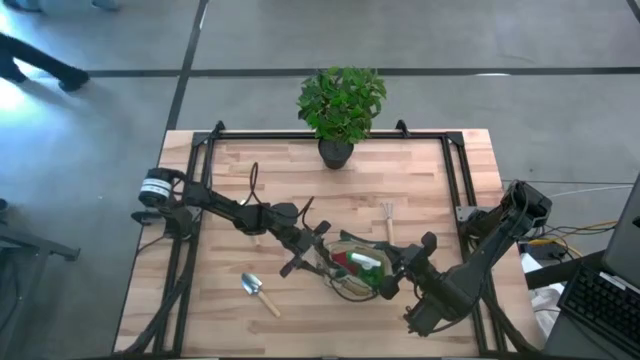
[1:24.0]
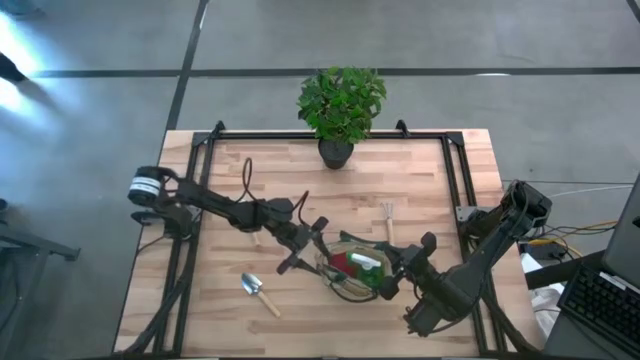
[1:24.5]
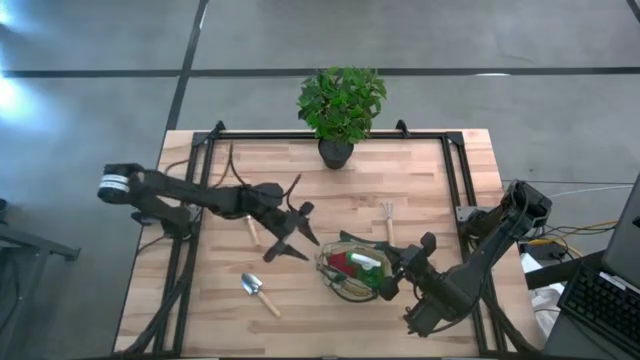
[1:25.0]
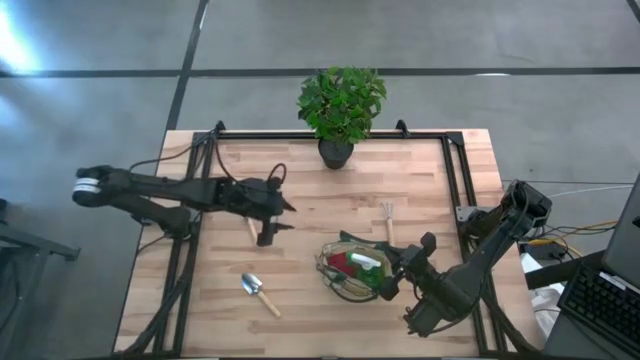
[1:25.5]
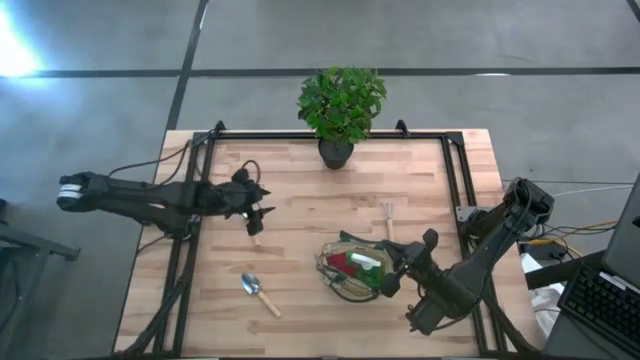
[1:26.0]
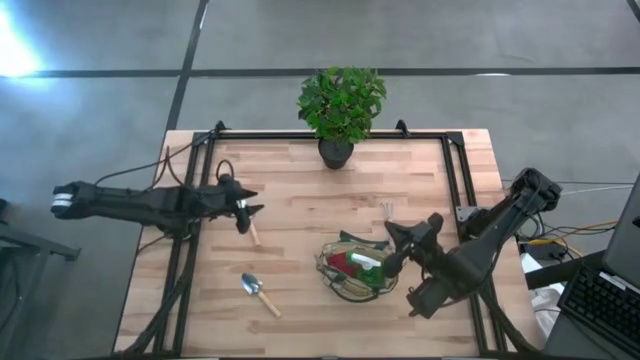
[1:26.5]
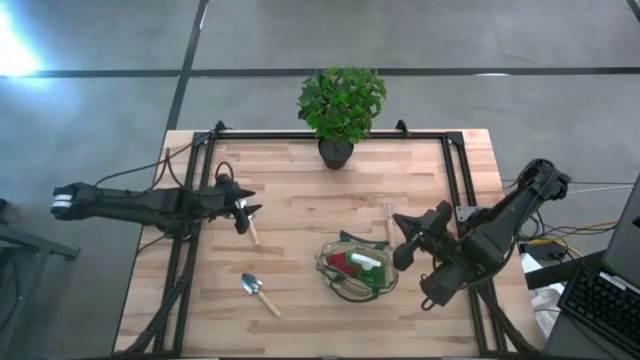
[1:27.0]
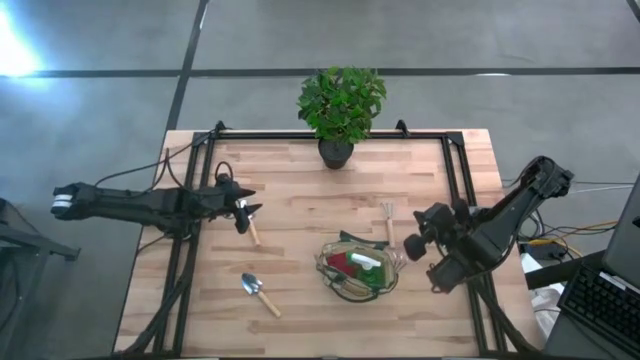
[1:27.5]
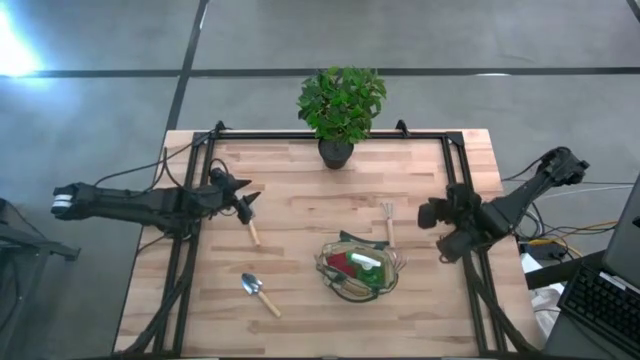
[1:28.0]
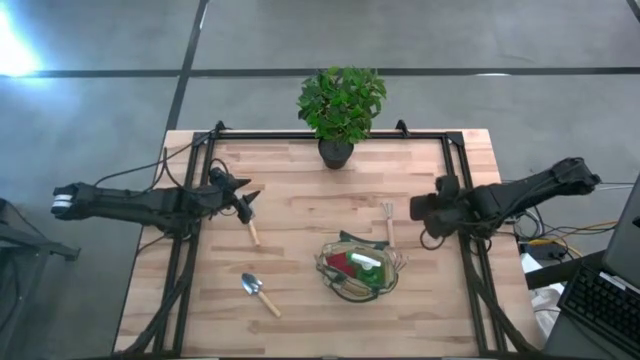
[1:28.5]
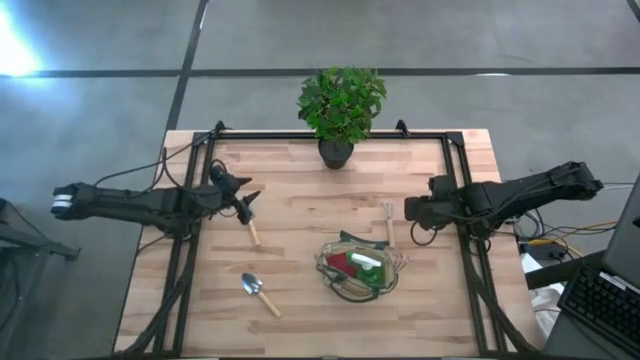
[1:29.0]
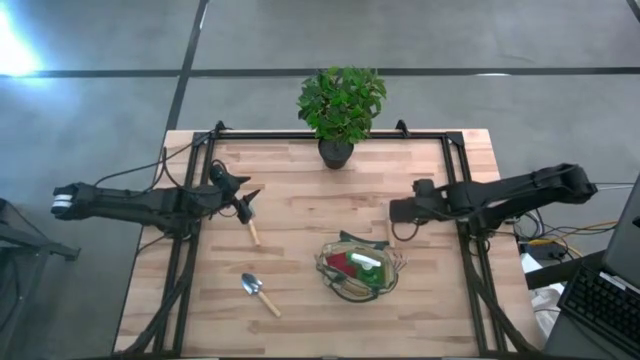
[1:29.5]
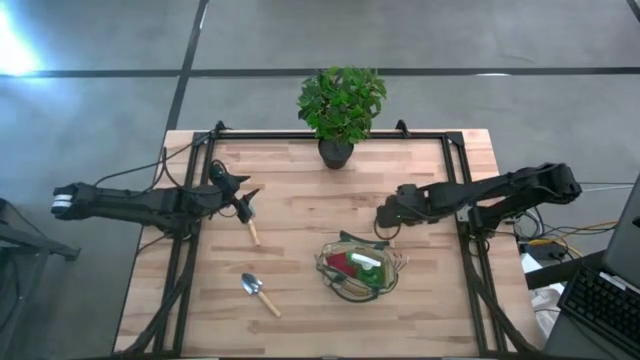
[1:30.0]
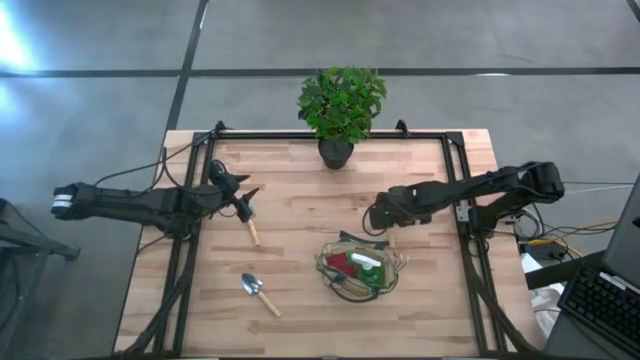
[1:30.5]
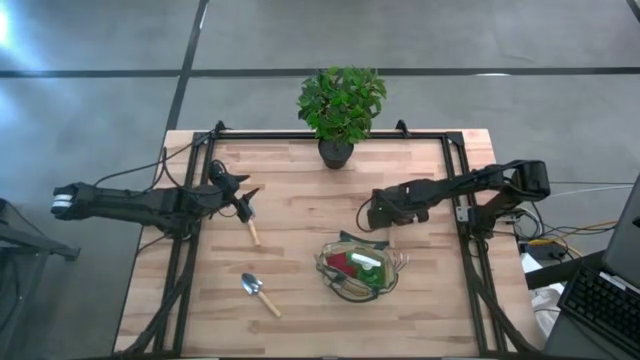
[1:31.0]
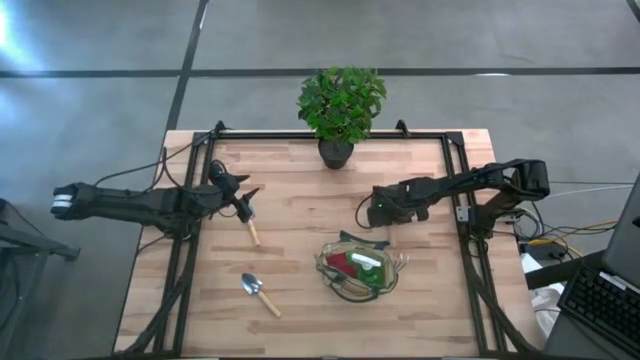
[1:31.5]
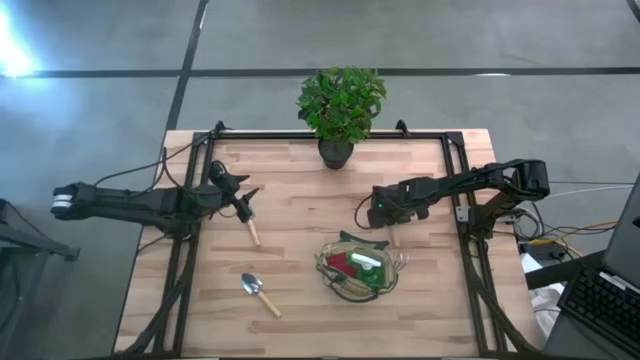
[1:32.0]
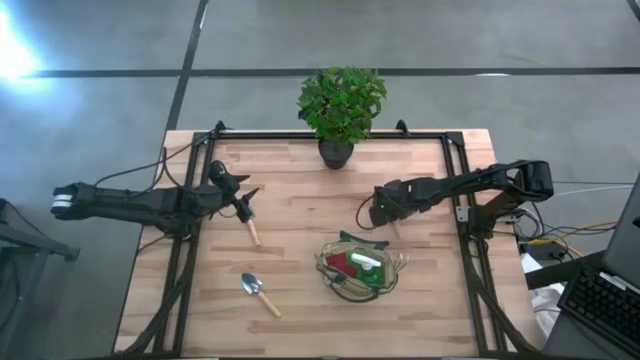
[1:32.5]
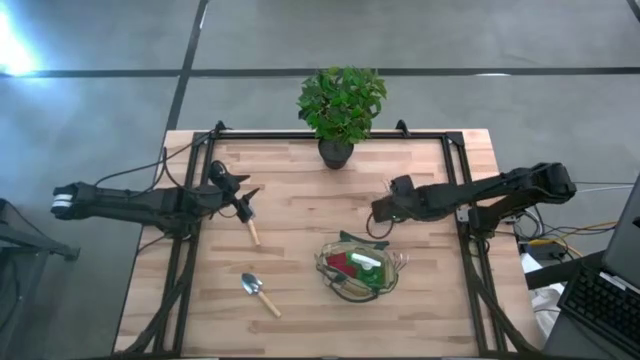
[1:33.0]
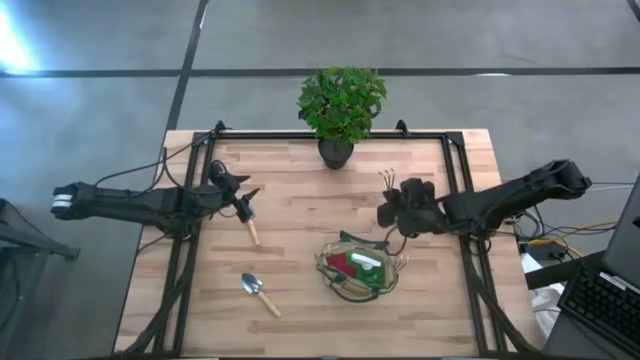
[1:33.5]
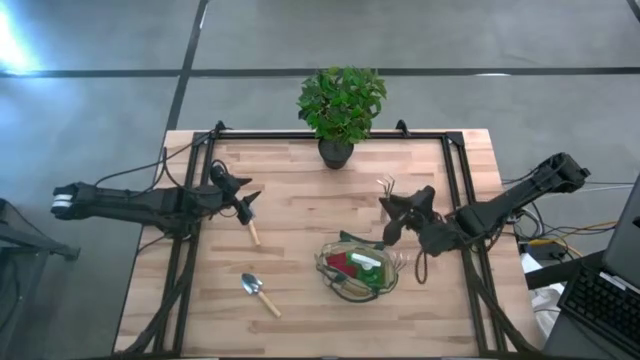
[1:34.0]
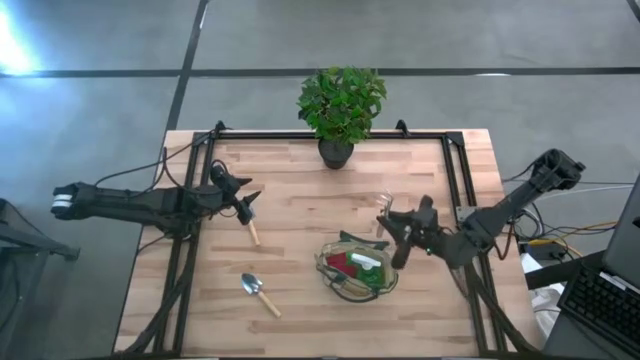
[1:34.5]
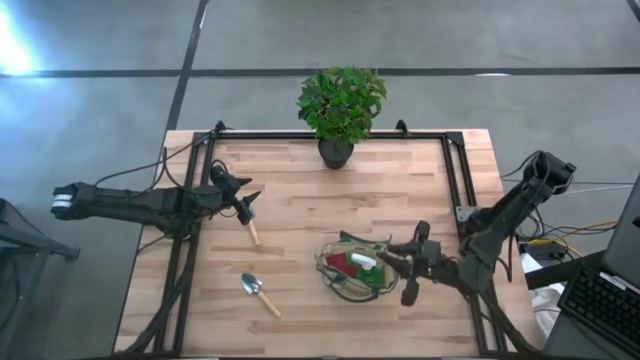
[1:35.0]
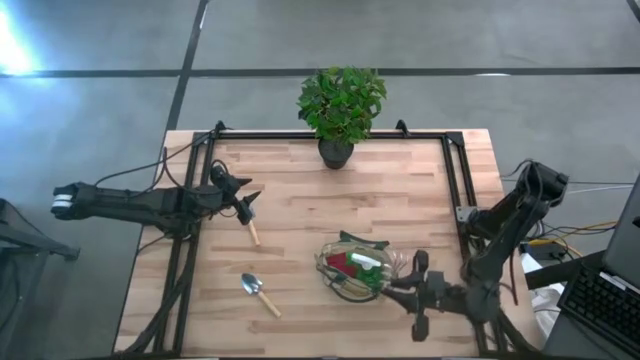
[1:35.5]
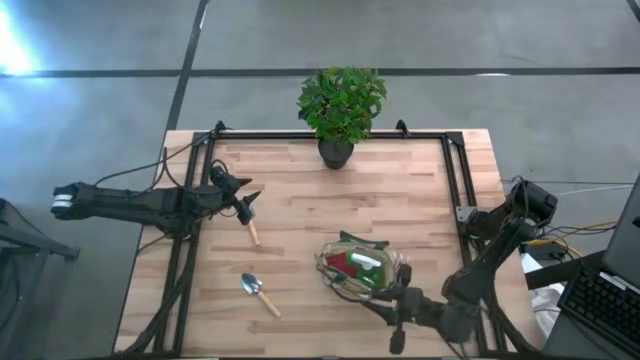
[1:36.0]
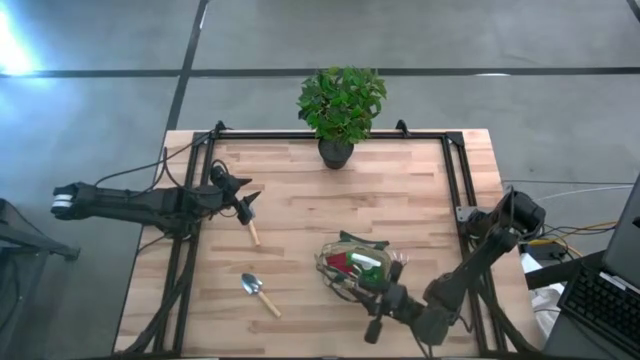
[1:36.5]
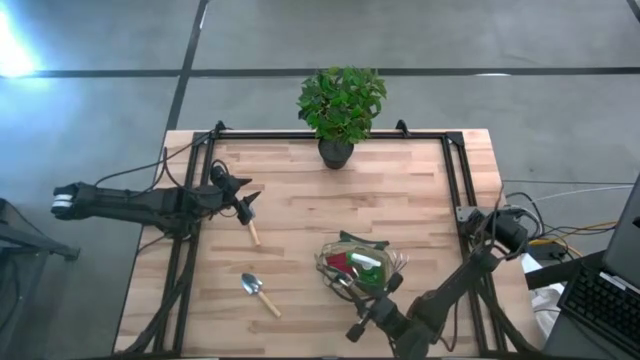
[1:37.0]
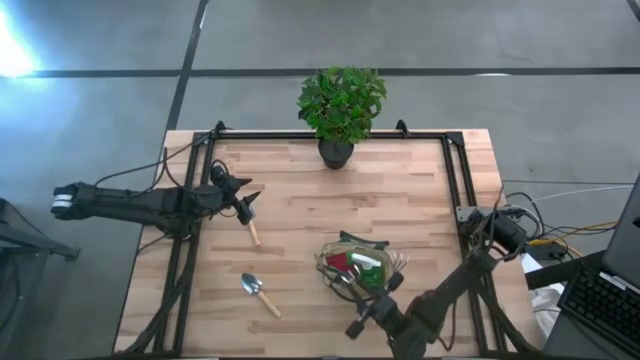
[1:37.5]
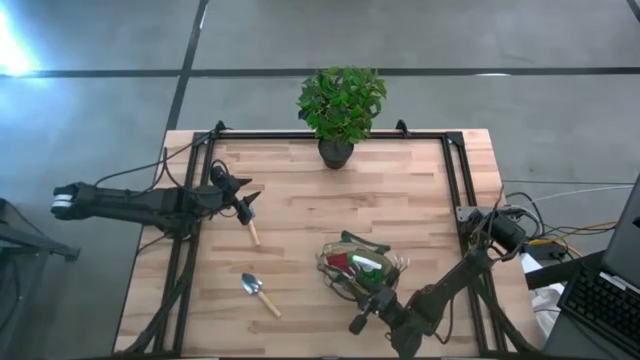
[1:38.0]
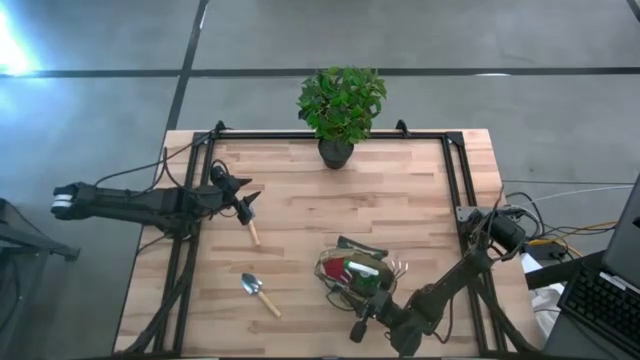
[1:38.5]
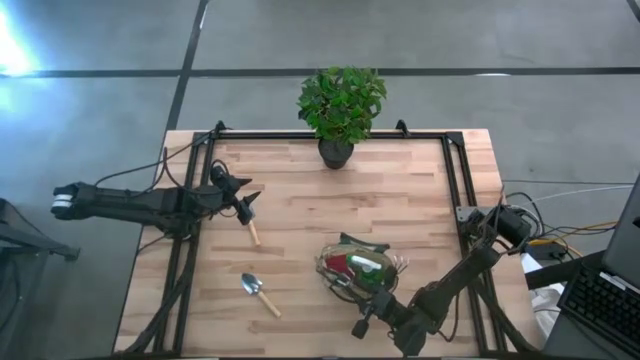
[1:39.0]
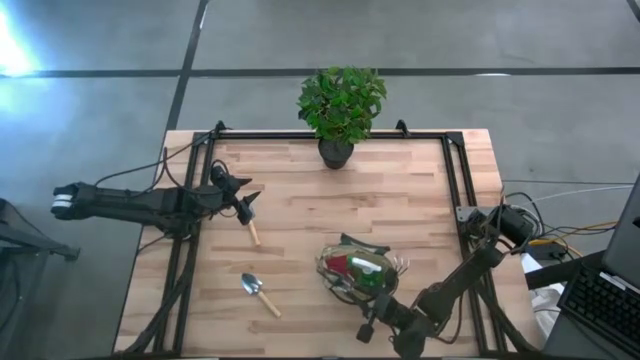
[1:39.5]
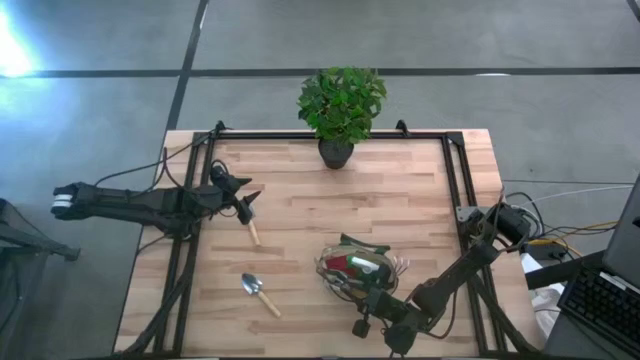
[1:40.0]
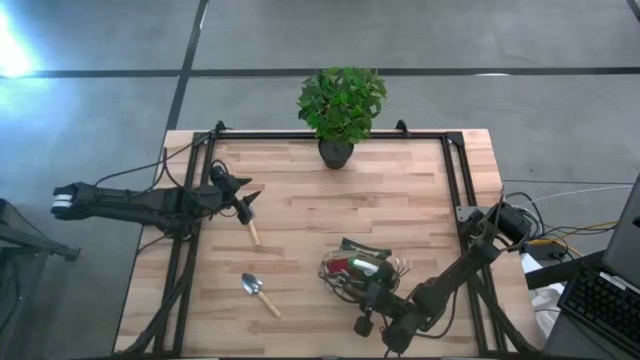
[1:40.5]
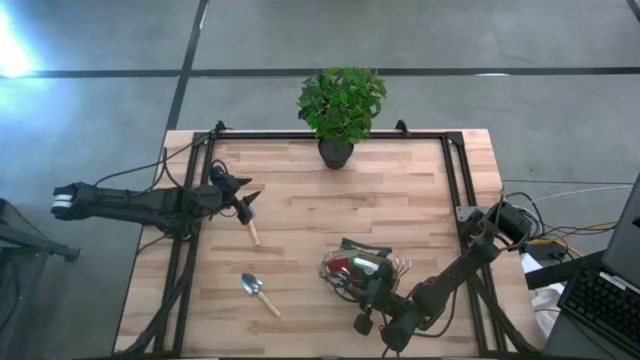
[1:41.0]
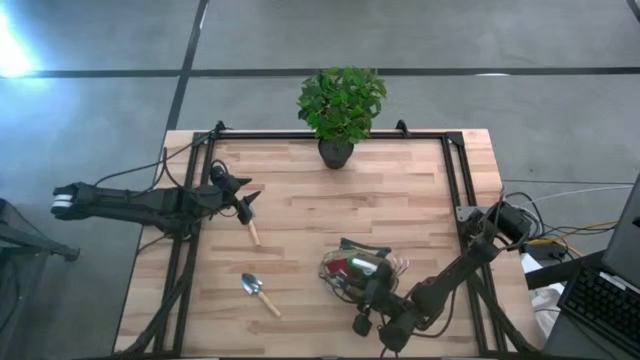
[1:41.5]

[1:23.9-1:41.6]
Task: Pick & Place Garden tools in Gardening bag
Put the brown hand rake into the green gardening bag

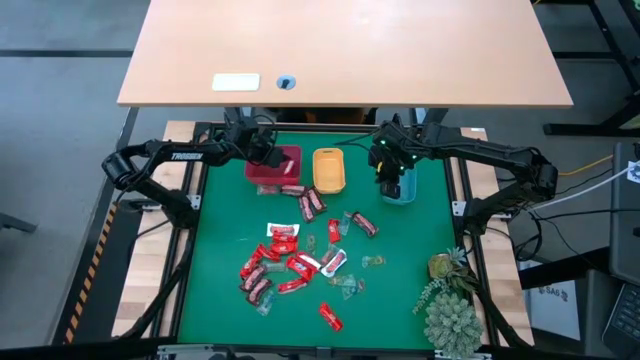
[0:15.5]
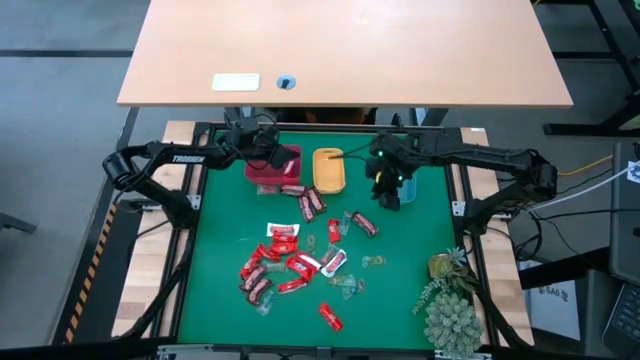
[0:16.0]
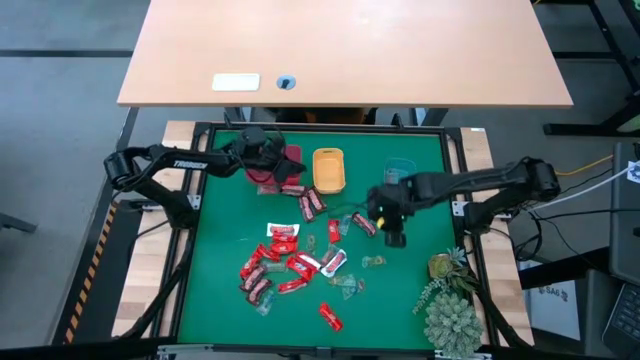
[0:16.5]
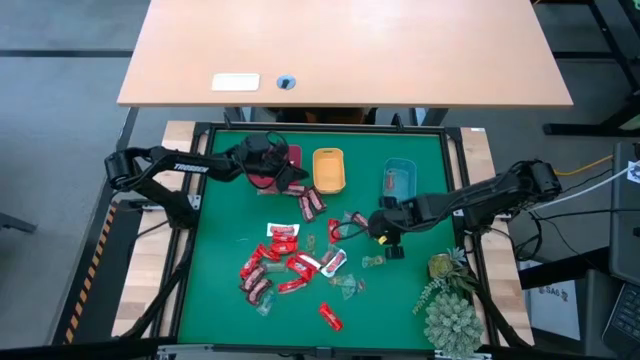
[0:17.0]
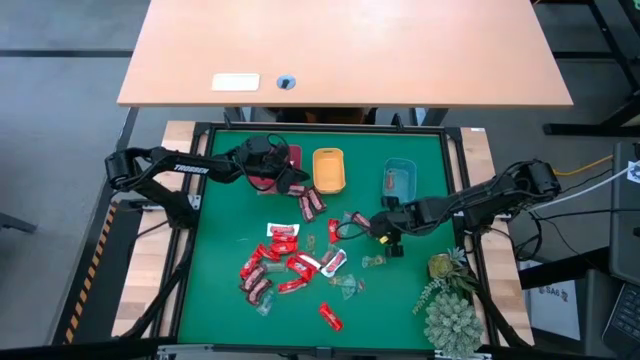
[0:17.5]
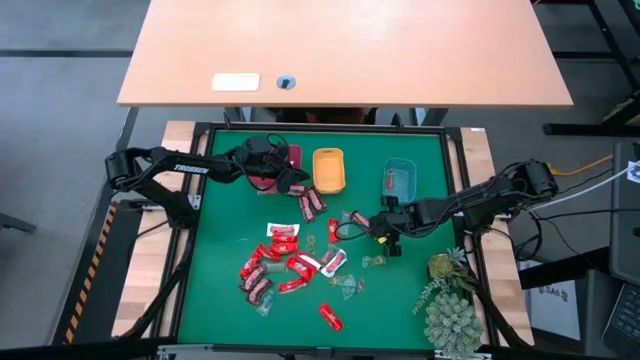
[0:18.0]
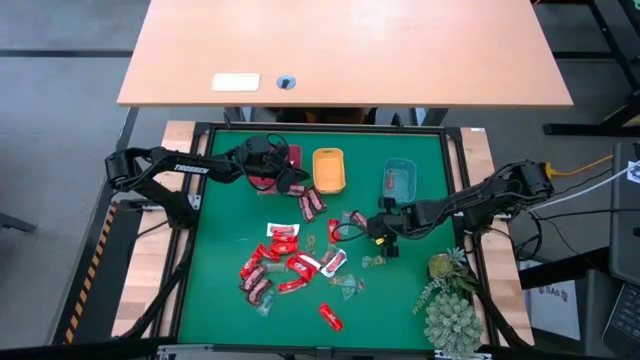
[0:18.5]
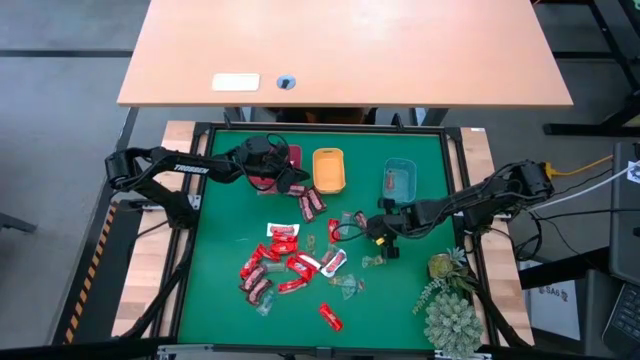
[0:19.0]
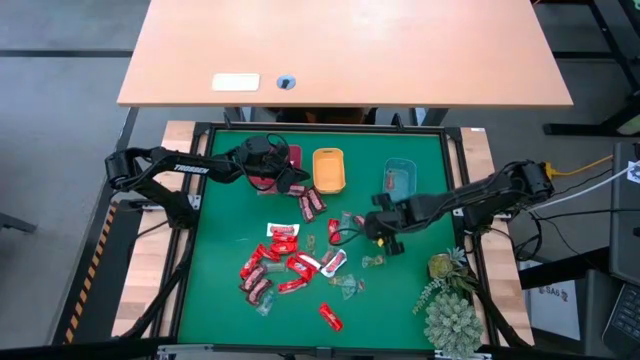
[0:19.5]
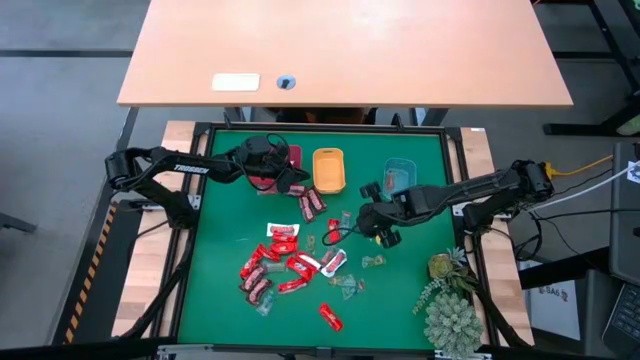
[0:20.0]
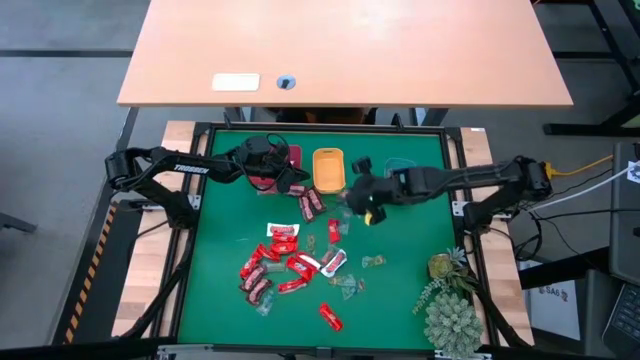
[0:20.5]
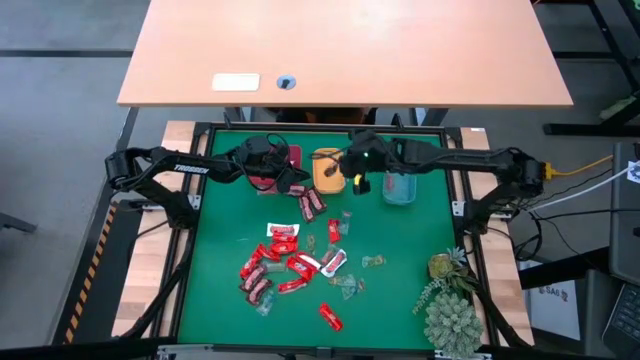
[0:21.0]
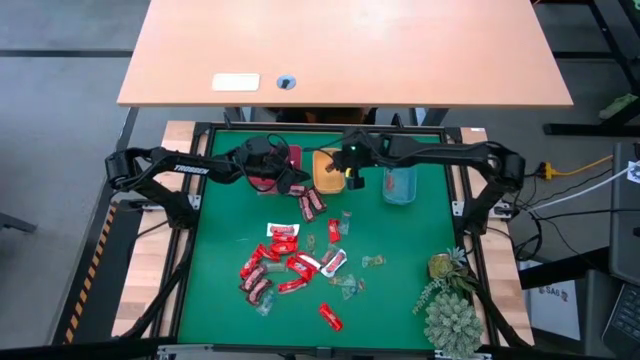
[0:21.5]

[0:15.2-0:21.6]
Task: Sort candy
Put the brown chocolate bar into the yellow bin
